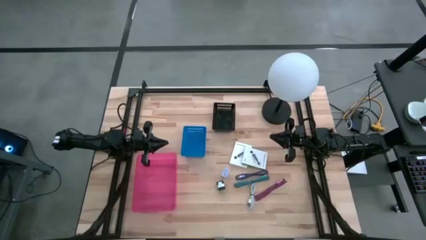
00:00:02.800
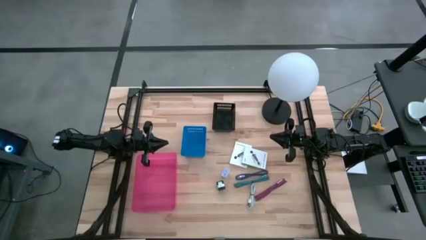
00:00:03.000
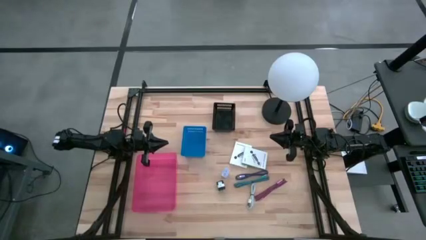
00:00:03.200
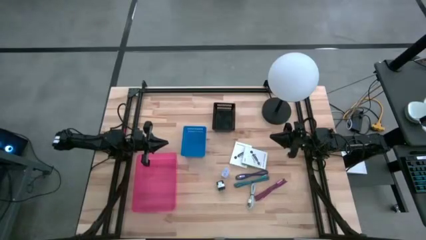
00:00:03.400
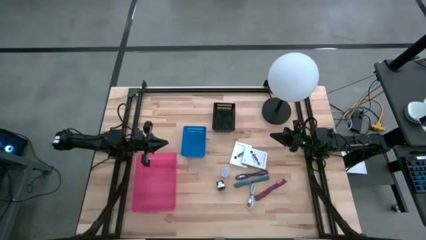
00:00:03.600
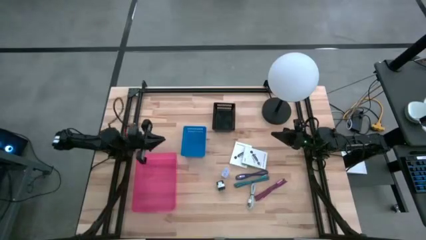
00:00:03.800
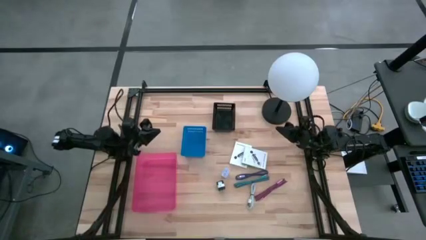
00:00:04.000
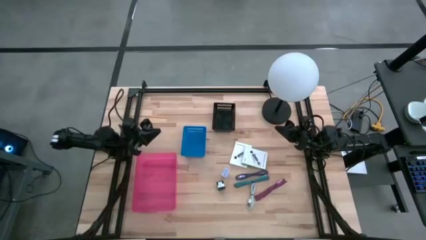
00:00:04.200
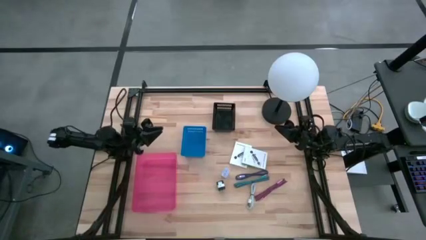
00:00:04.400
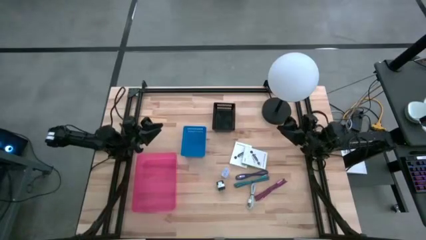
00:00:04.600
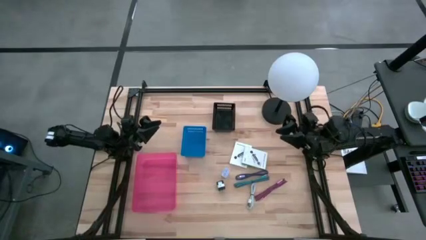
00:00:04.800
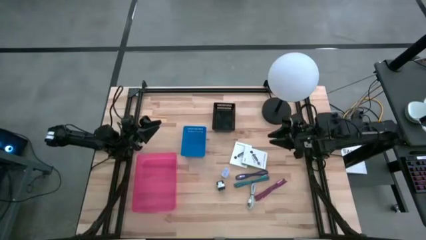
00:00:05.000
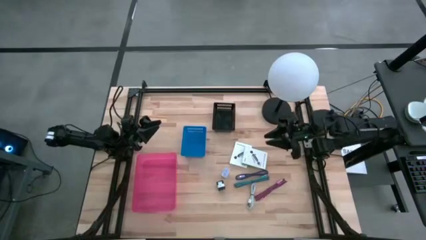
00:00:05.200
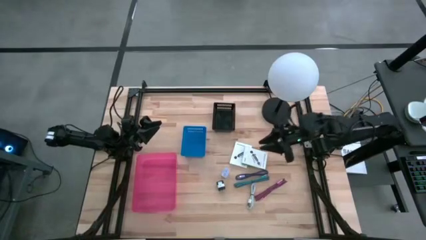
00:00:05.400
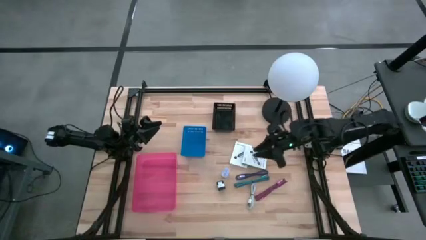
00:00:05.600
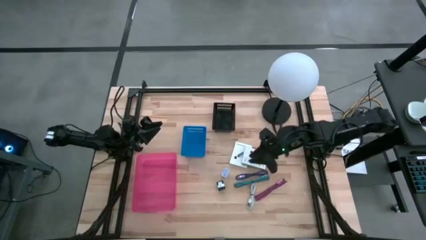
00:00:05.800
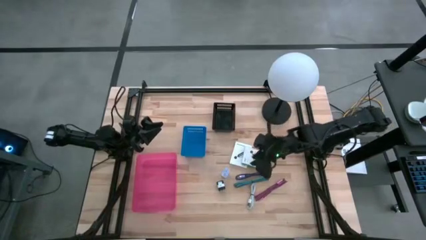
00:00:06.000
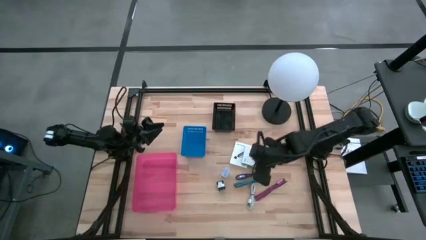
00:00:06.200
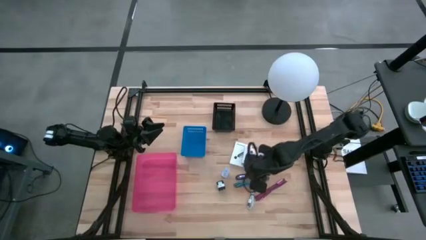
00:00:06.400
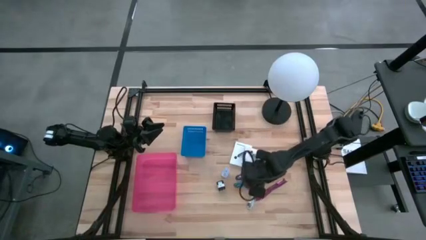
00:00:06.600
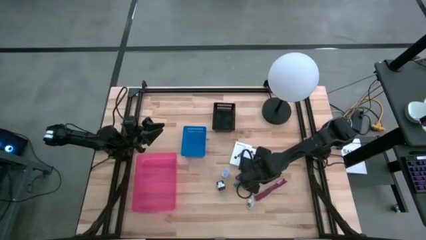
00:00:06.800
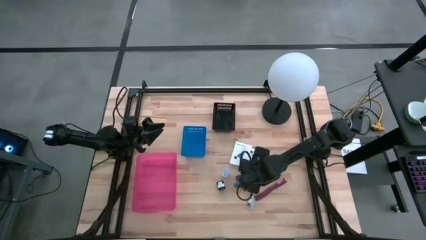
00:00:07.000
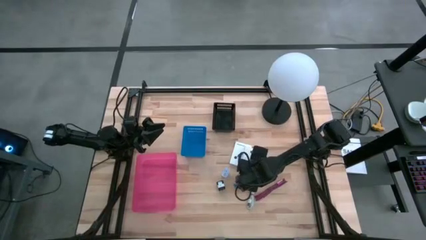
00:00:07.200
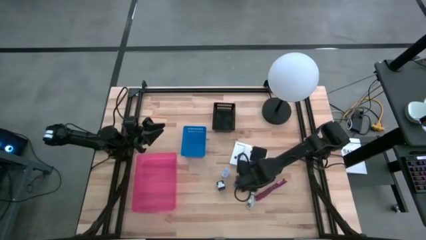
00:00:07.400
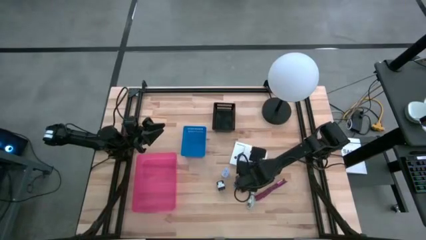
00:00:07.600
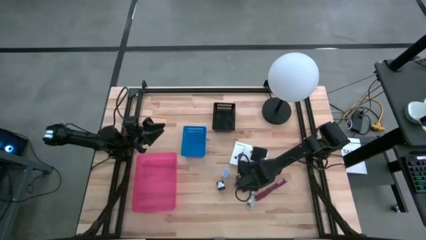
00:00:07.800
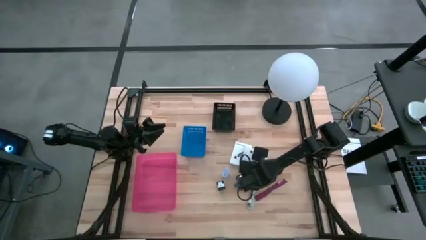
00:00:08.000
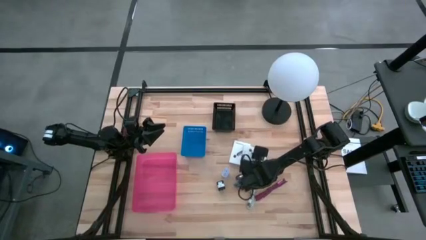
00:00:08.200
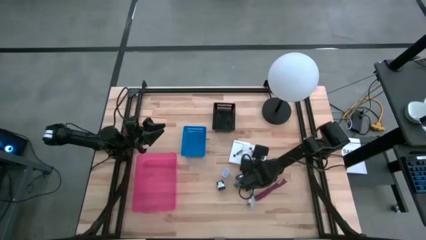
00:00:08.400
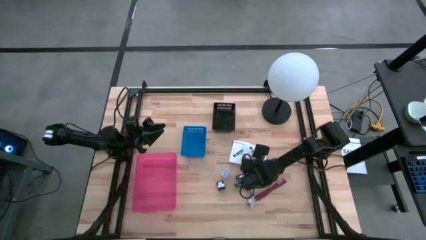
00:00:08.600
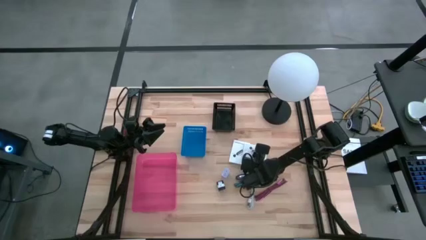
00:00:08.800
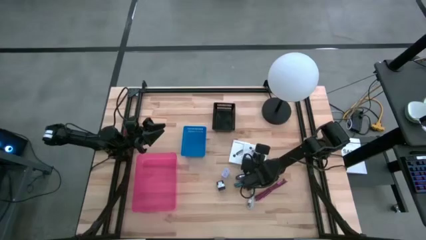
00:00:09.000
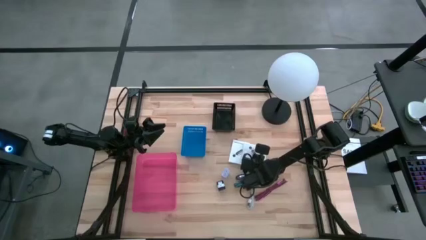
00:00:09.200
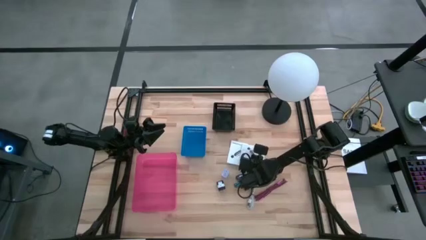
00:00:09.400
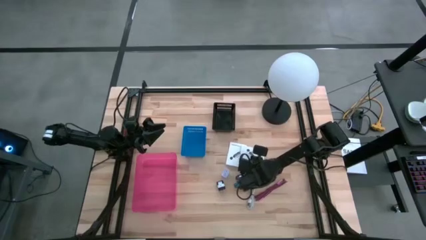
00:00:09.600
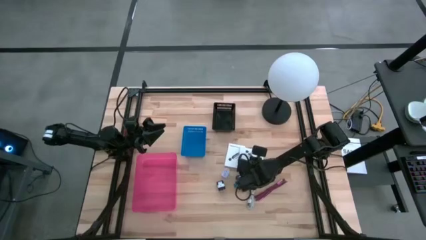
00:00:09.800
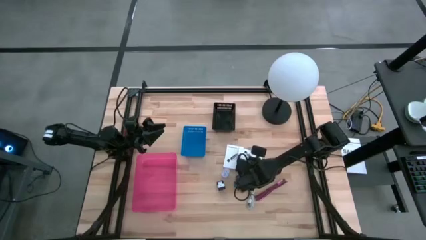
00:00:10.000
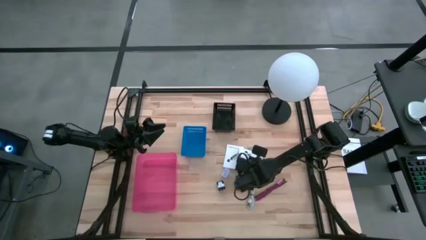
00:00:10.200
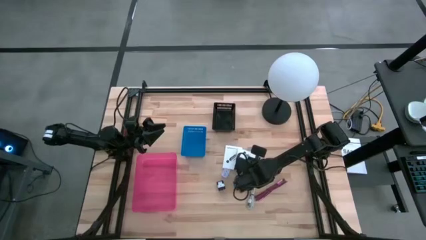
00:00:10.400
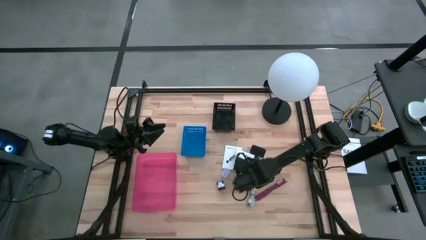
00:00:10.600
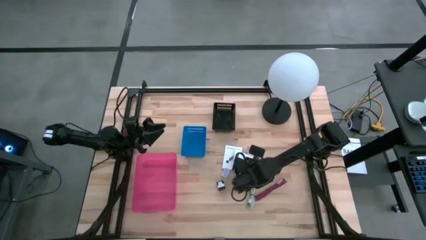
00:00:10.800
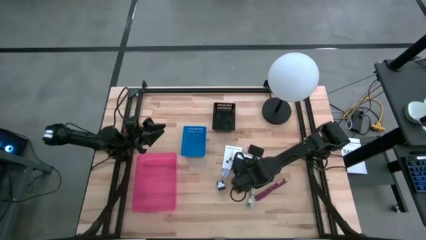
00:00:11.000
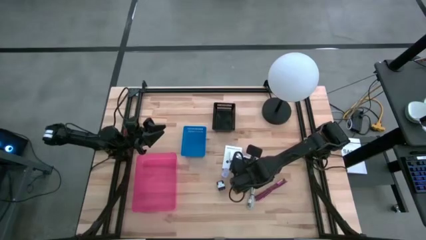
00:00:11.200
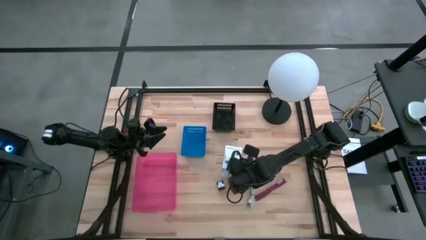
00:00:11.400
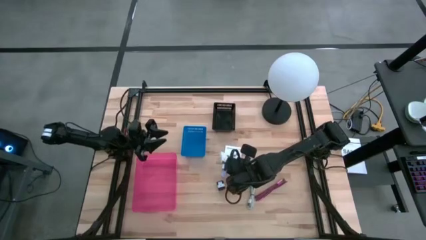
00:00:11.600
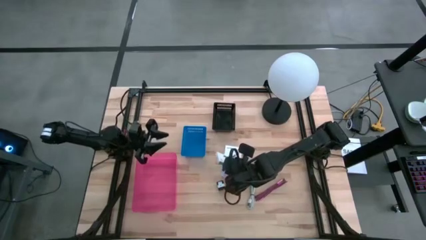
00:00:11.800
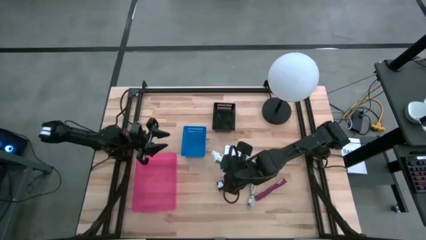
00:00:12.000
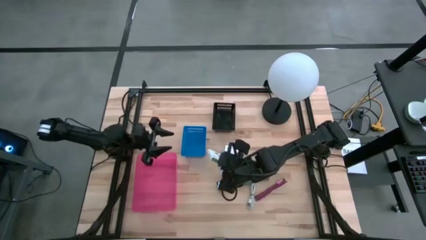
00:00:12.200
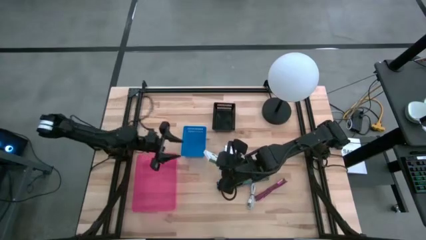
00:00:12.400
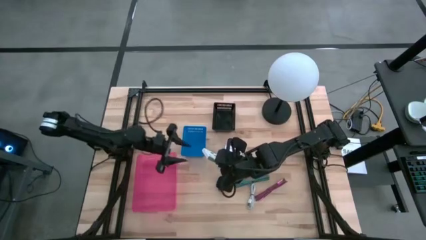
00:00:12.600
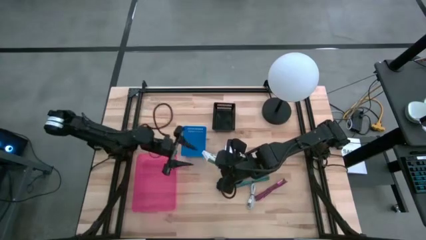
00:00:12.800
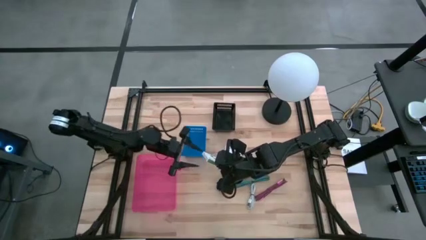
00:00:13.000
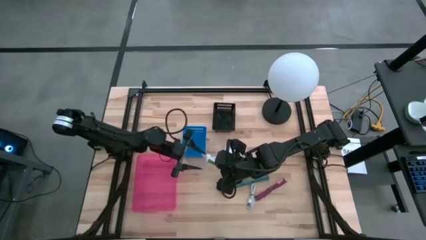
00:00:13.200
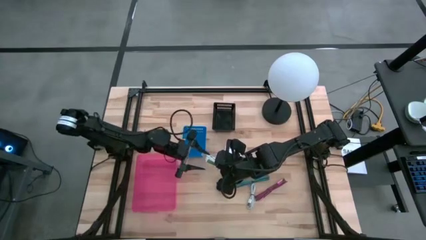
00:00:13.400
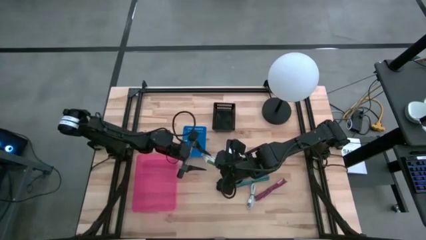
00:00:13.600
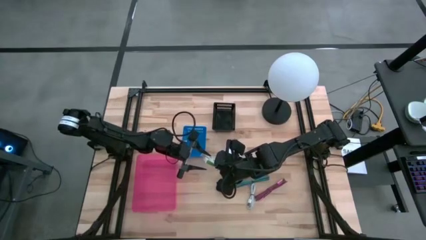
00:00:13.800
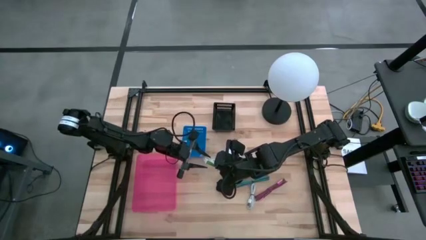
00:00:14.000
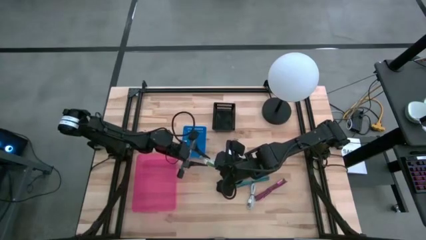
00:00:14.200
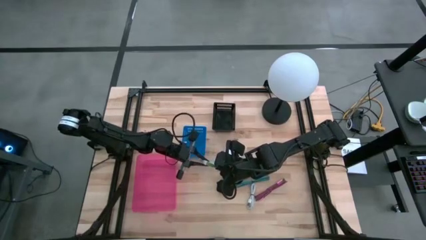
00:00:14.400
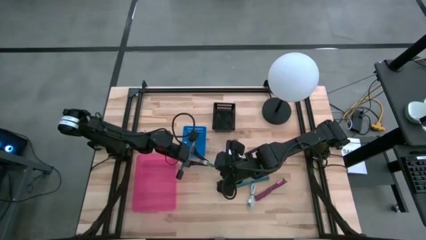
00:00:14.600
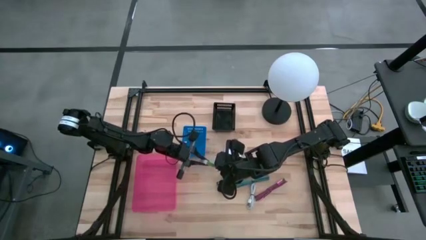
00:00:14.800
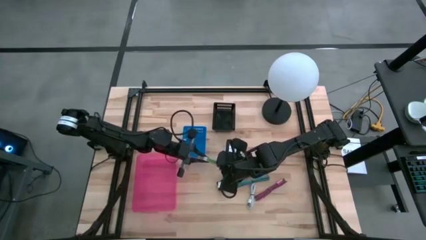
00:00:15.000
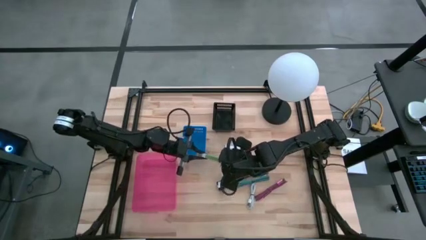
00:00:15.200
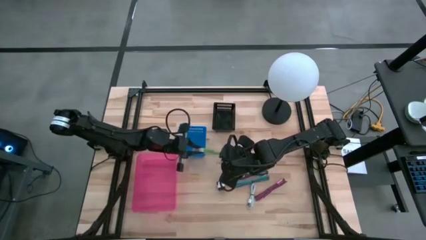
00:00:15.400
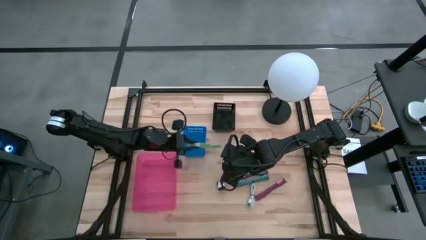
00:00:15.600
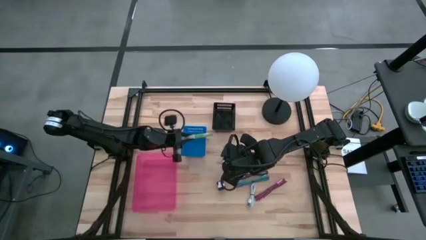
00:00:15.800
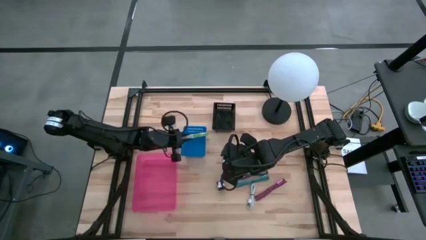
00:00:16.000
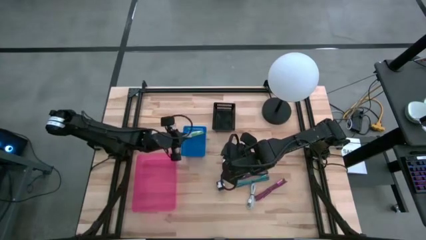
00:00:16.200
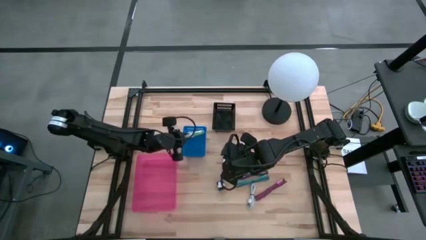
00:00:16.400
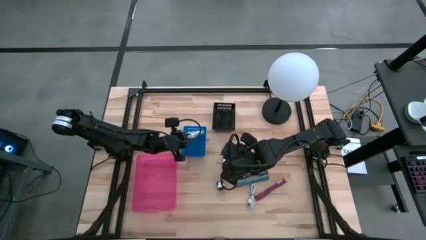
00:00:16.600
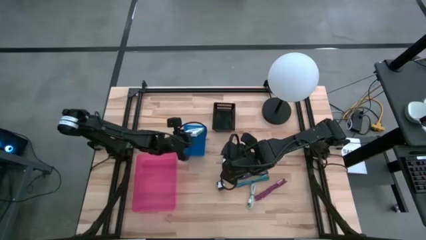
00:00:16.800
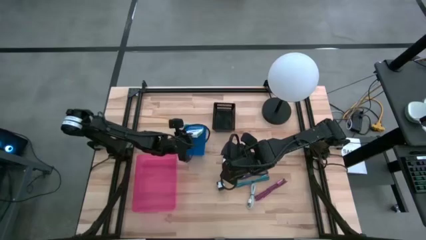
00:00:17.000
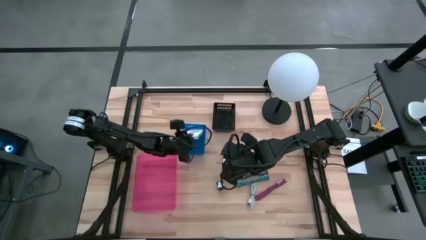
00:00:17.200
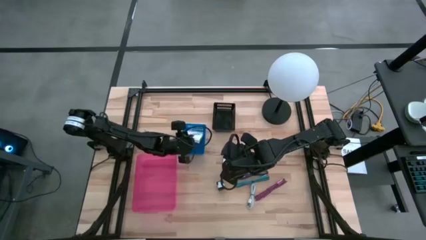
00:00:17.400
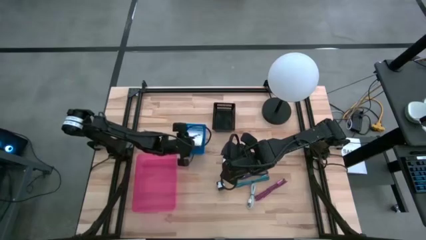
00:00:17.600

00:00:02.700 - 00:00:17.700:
Task: Pick and place items into bin
Put the right card reader box into the blue bin
